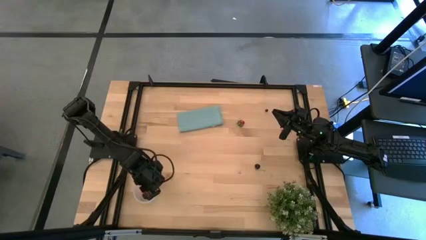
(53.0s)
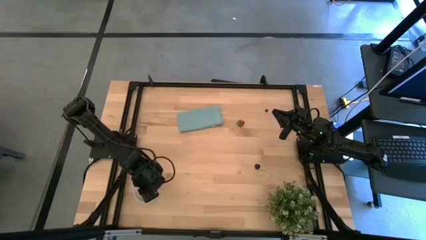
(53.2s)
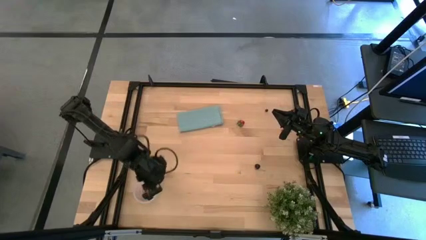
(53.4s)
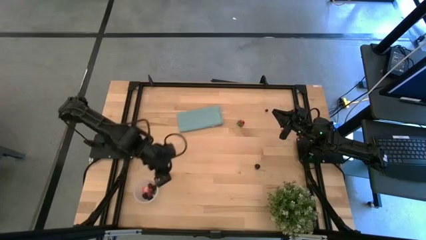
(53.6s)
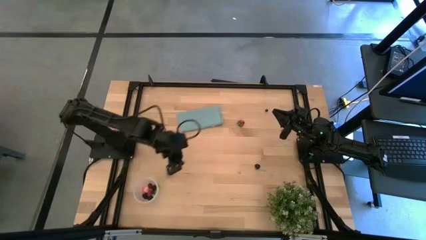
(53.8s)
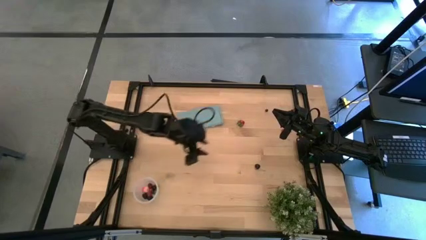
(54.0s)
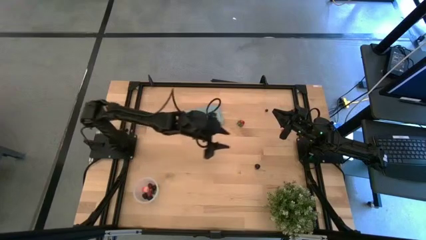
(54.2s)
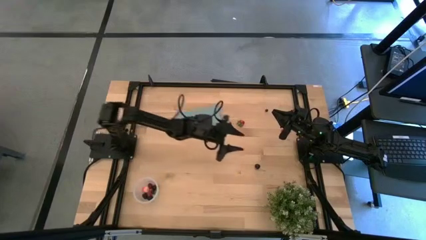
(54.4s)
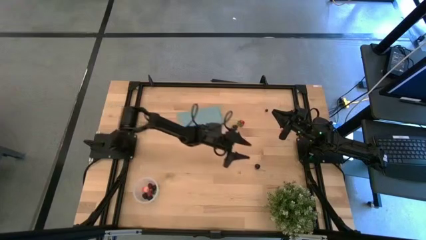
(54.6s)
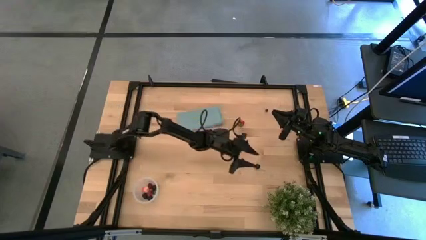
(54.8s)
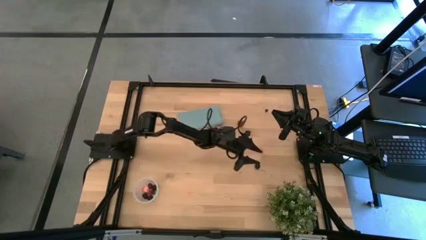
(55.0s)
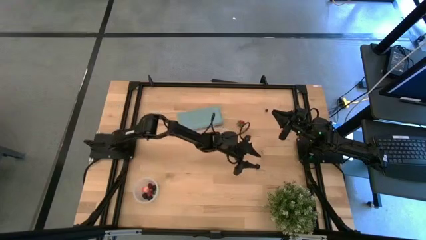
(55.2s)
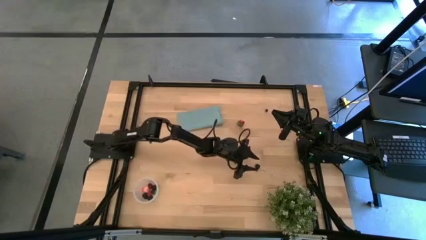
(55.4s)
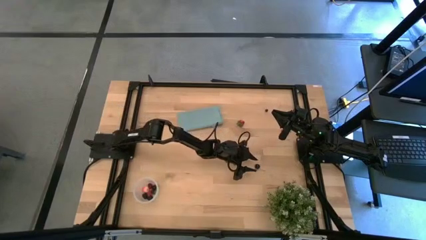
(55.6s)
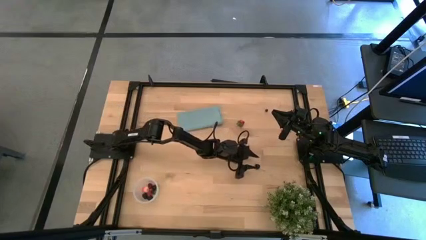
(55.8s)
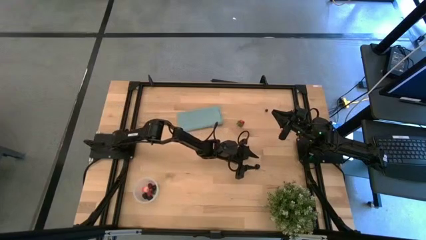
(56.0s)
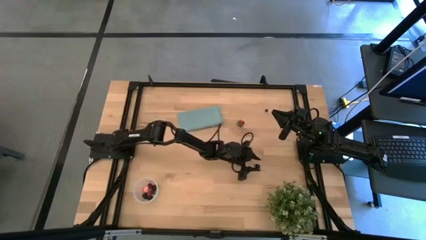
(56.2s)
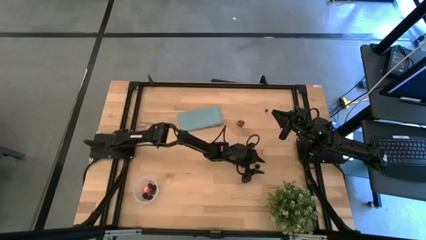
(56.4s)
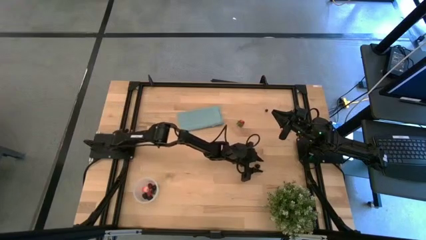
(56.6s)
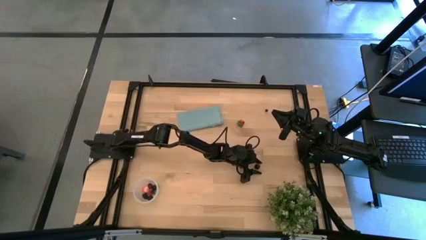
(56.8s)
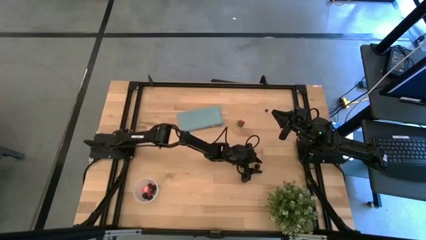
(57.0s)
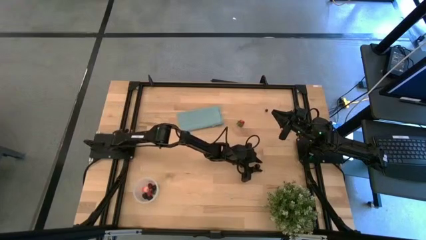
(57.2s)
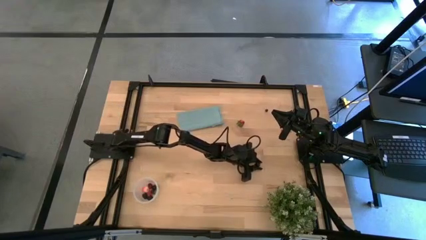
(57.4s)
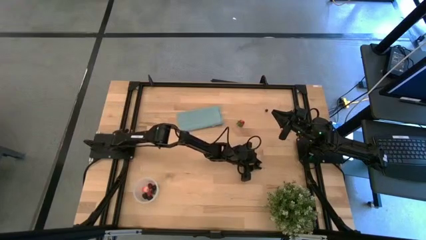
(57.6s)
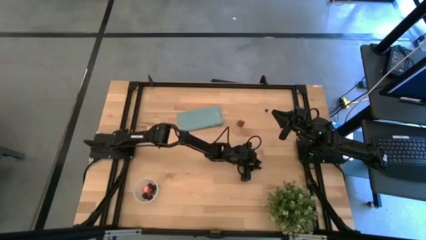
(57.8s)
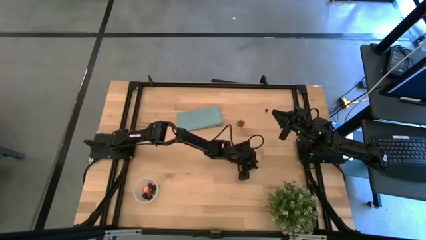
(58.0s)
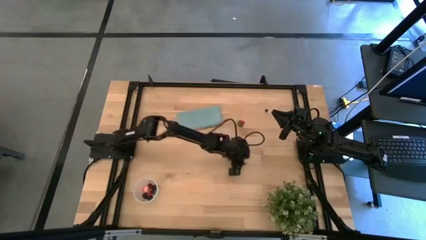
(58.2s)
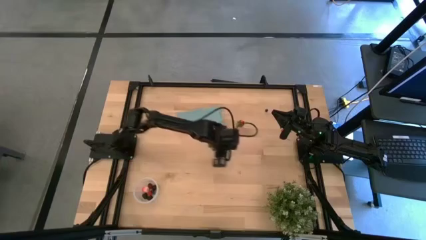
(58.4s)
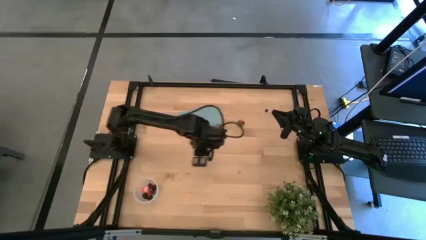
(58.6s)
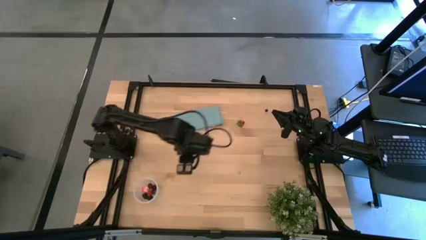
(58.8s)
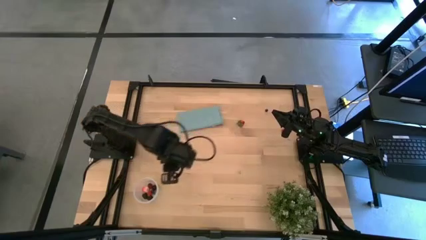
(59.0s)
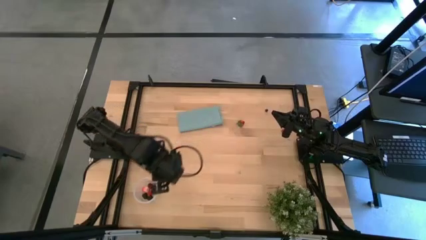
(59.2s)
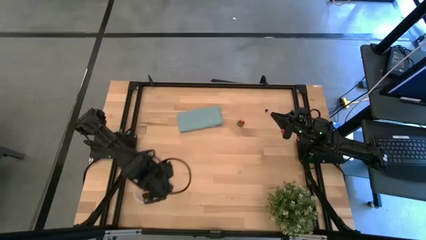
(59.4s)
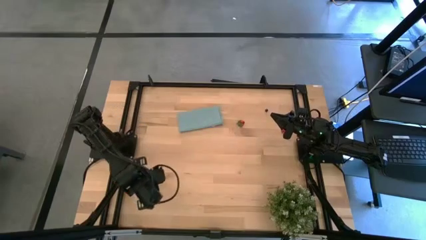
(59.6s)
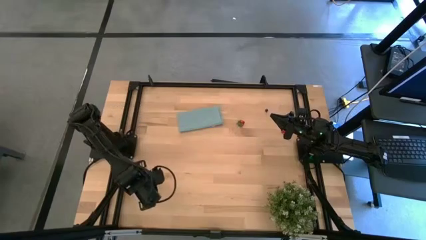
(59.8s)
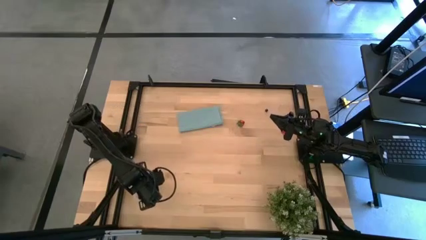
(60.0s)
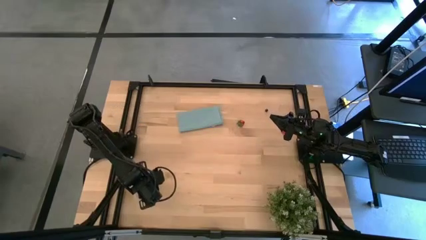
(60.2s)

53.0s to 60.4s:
Task: Pick and placing Produce into tupperware
Put the black cherry into the transparent container

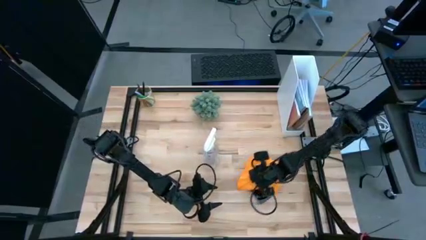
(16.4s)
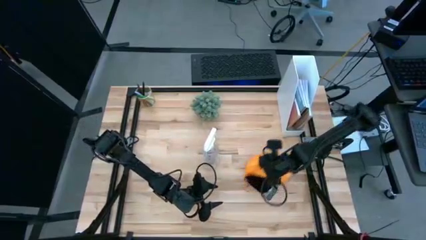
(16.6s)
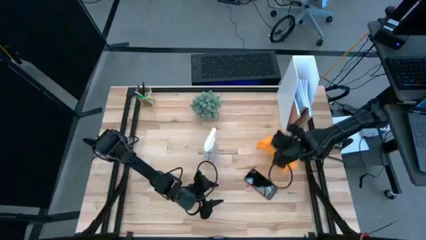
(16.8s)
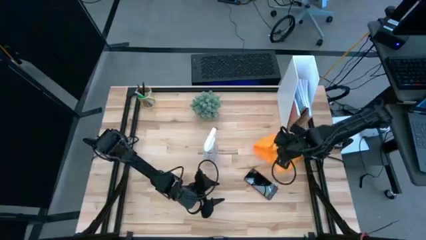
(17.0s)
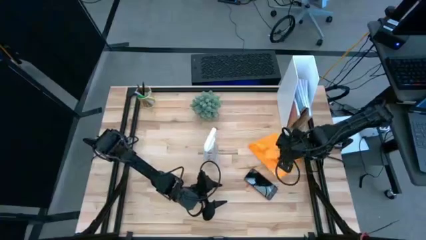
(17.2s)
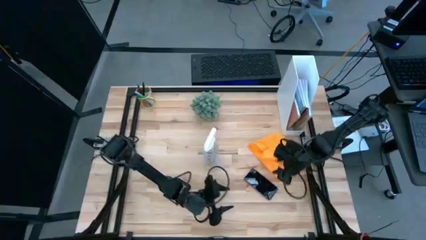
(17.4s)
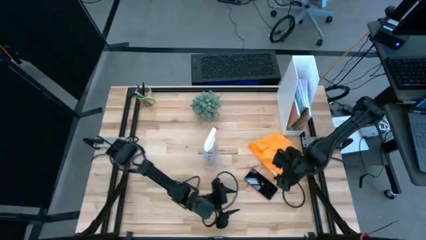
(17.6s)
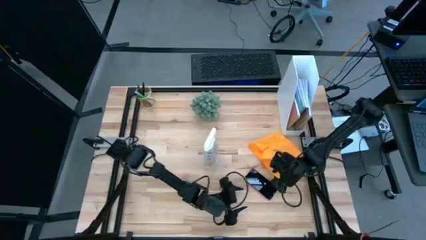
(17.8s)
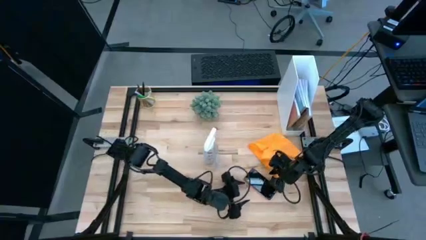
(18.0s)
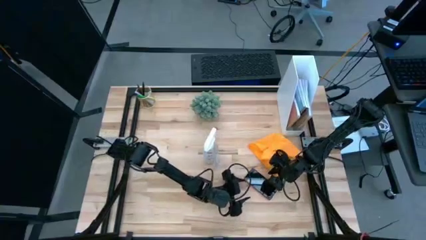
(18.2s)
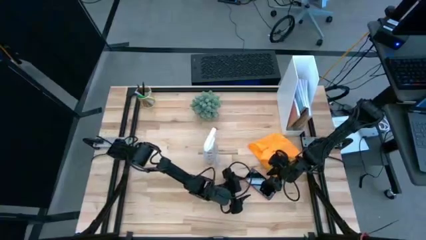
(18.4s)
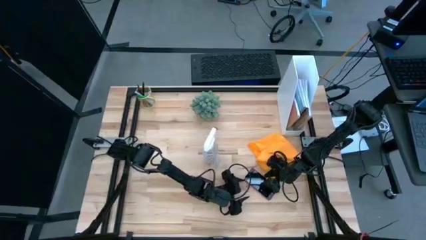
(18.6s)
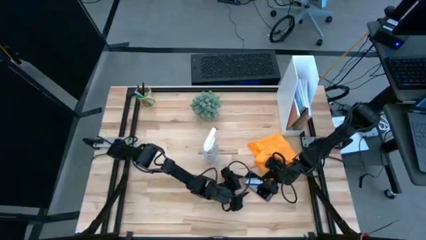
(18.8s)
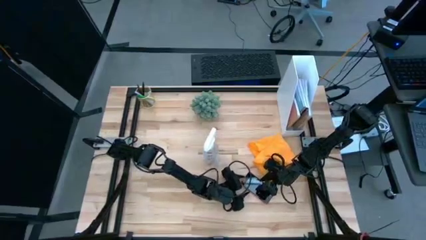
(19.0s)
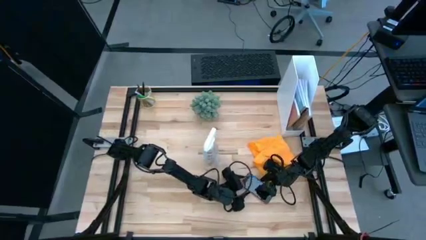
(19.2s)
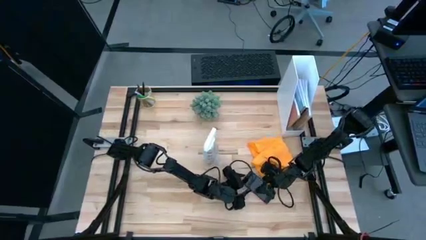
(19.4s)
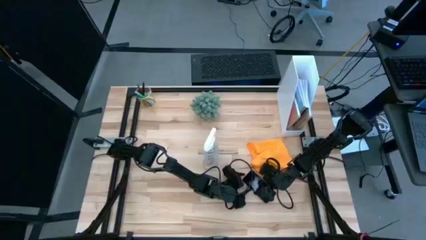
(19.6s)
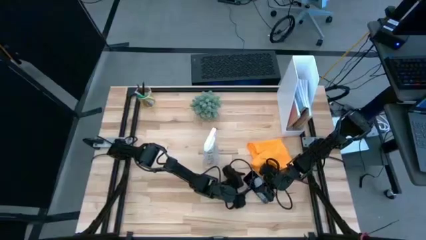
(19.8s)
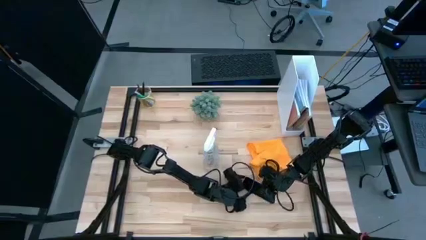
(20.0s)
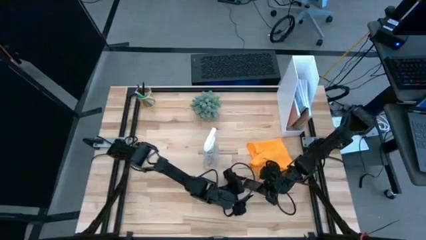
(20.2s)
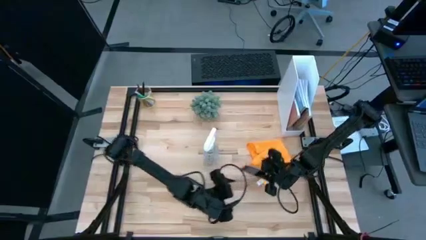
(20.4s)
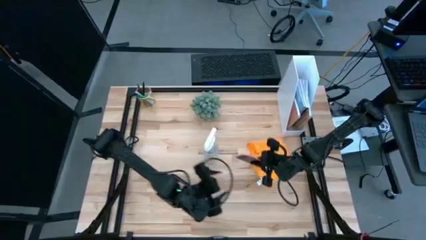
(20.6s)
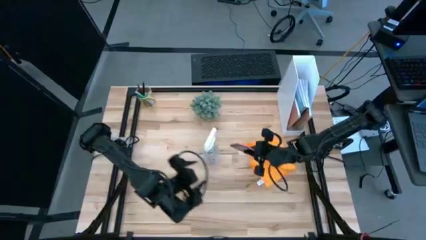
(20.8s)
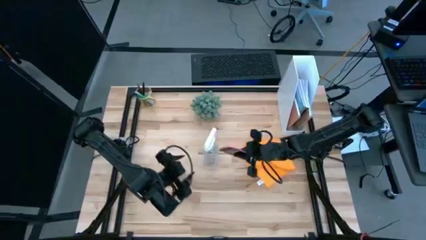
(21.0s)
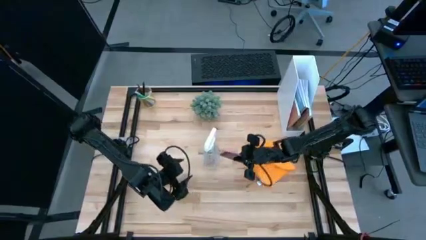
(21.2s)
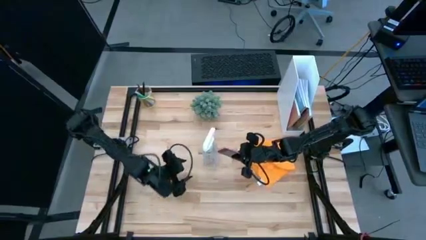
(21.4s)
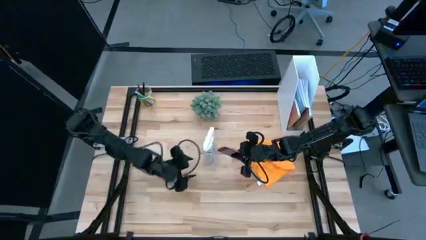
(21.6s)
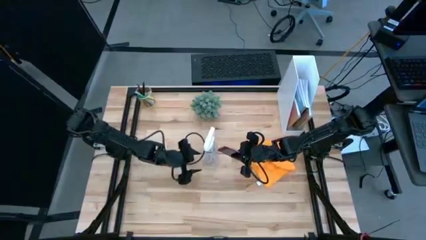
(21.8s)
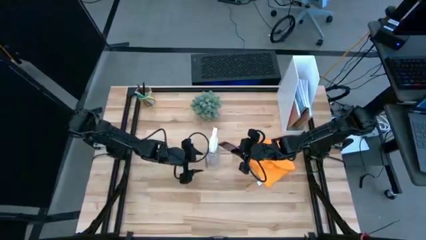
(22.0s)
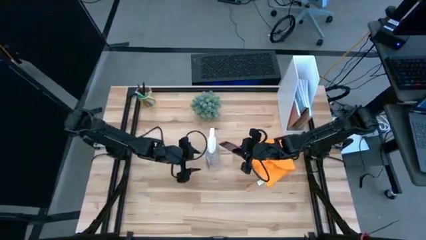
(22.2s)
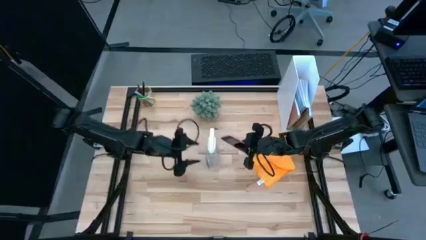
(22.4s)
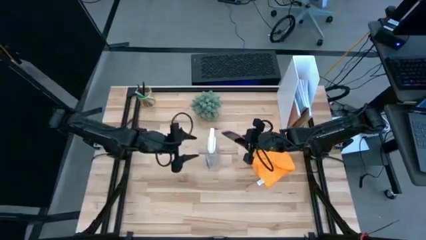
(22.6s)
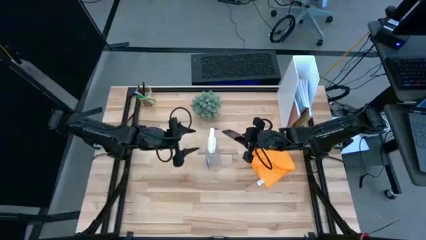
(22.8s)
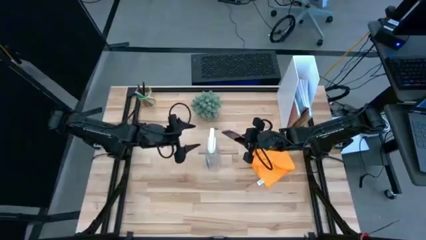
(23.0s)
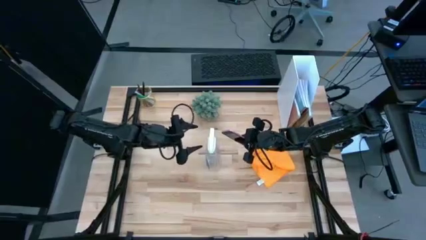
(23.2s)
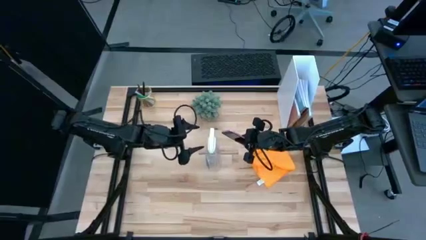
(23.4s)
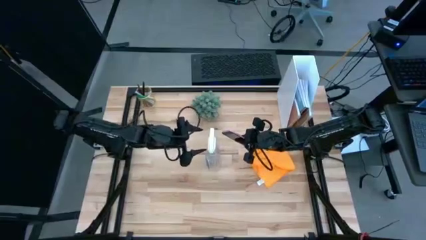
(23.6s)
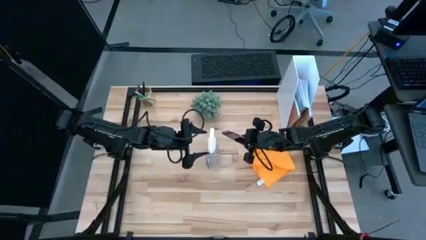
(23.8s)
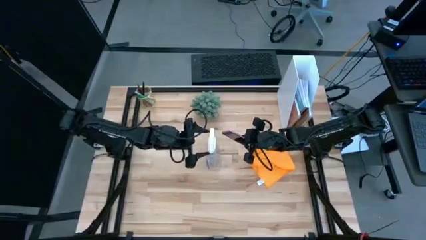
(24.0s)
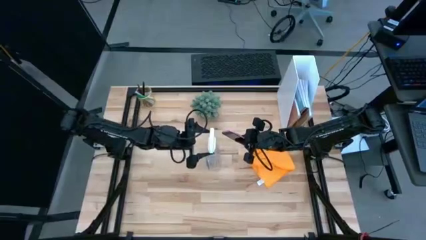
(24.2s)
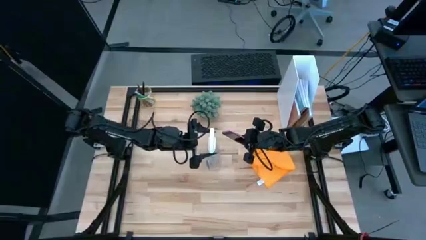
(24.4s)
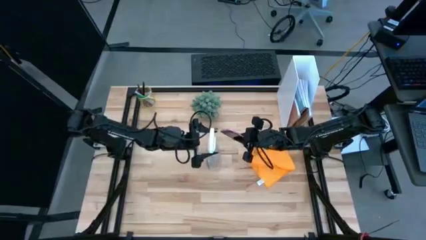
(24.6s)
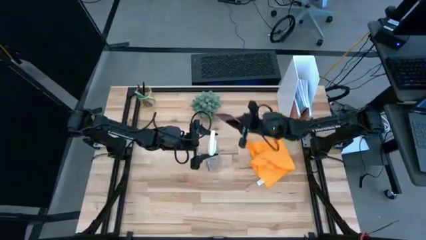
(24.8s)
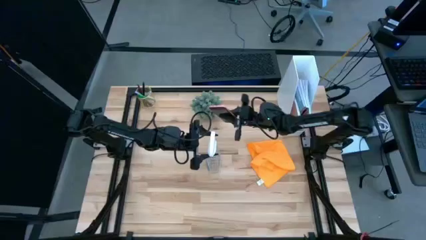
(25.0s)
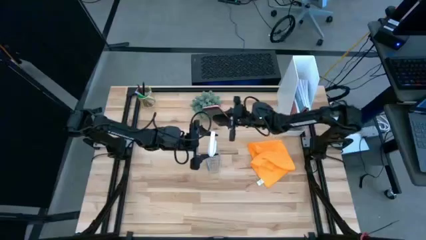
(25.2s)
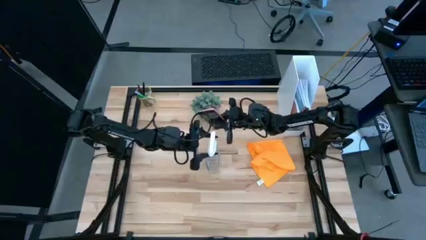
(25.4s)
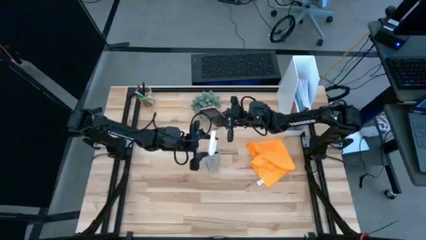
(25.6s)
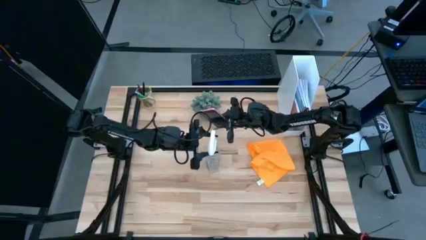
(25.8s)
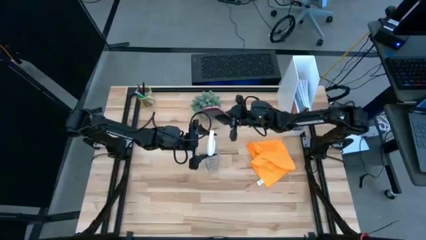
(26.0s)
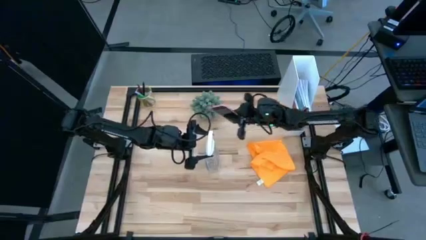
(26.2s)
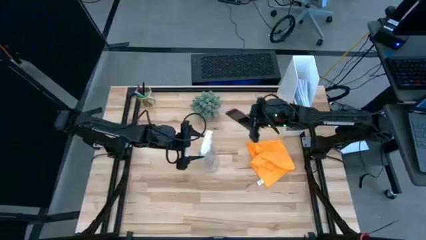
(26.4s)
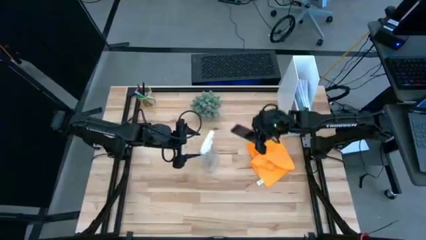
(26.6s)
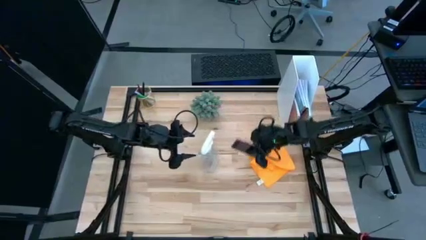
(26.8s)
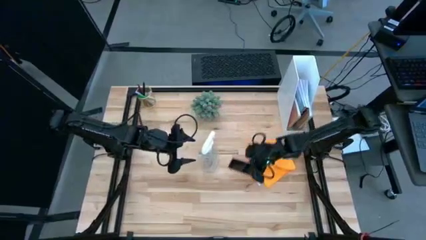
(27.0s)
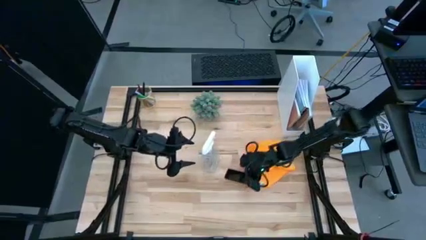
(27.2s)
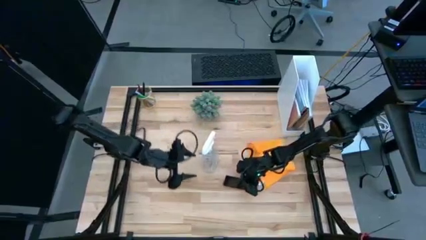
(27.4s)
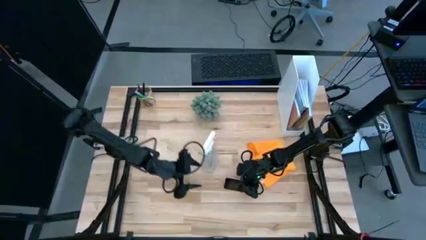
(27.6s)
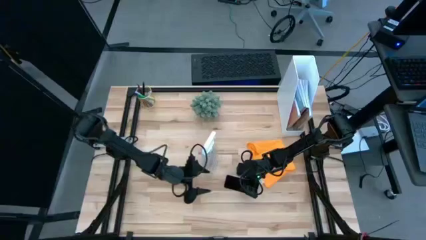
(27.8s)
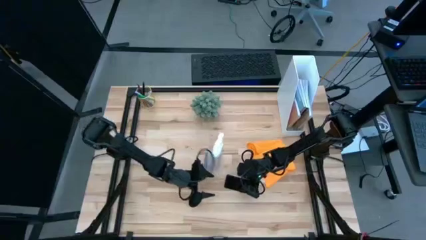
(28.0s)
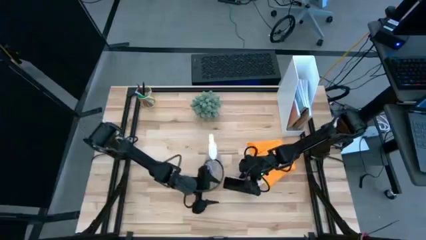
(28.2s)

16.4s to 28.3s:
Task: Apply microfiber cloth
Spray the front of the cellphone using the spray bottle
